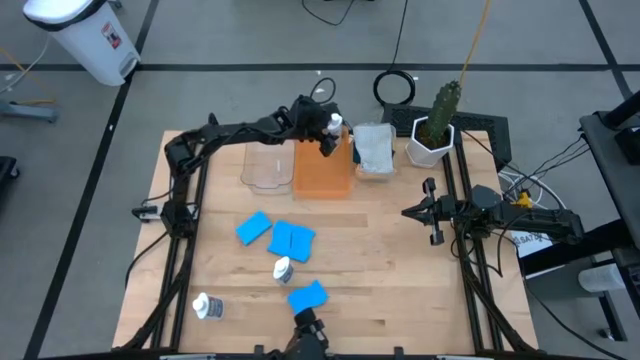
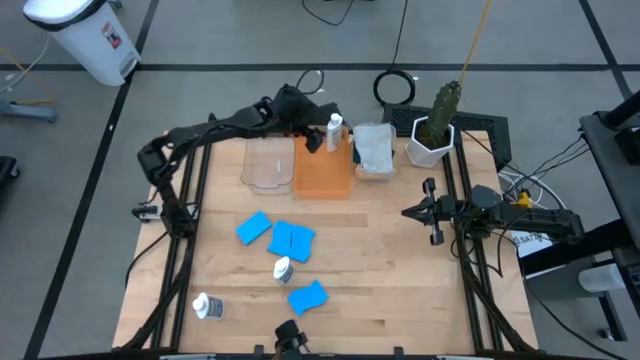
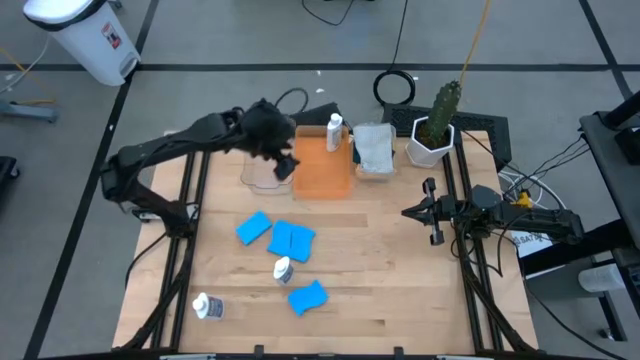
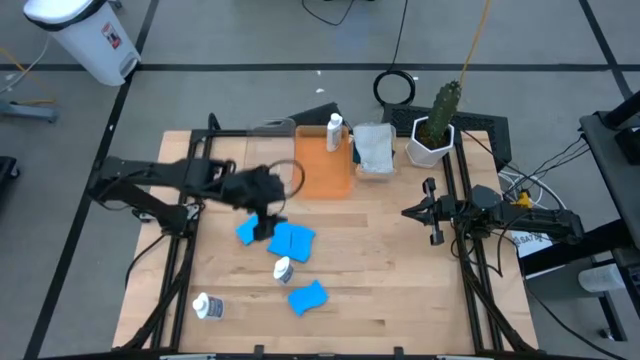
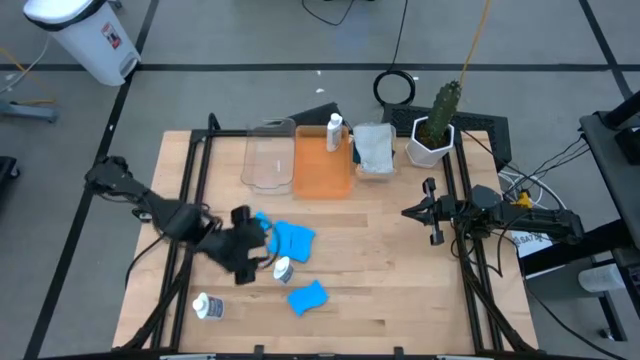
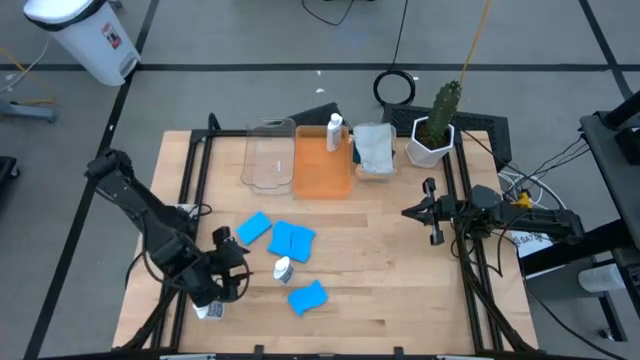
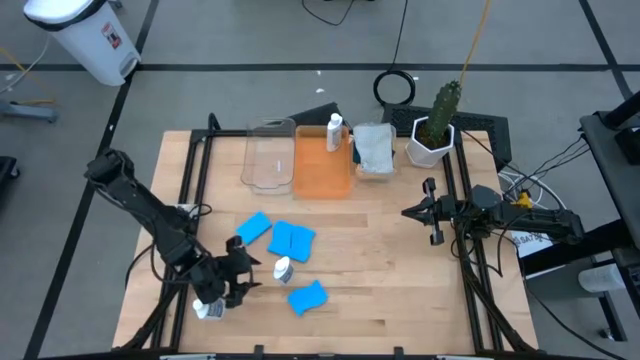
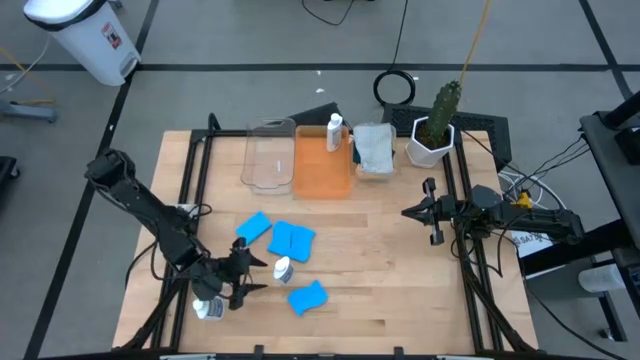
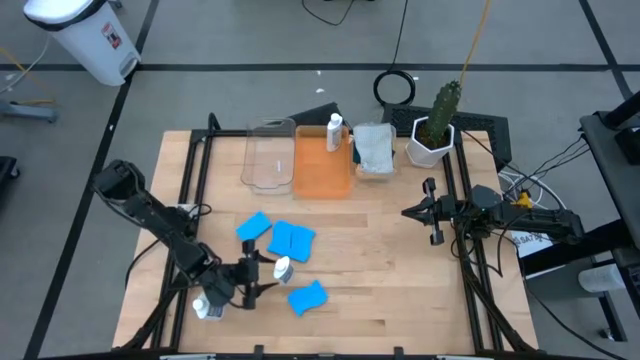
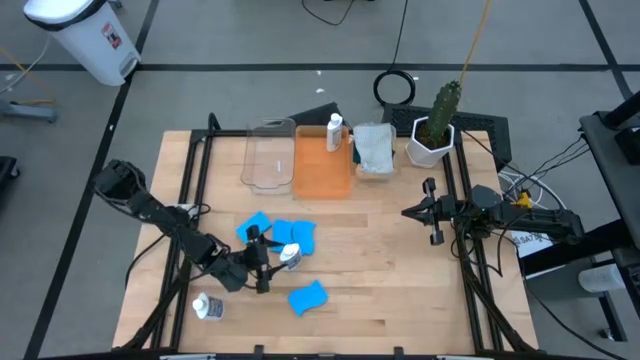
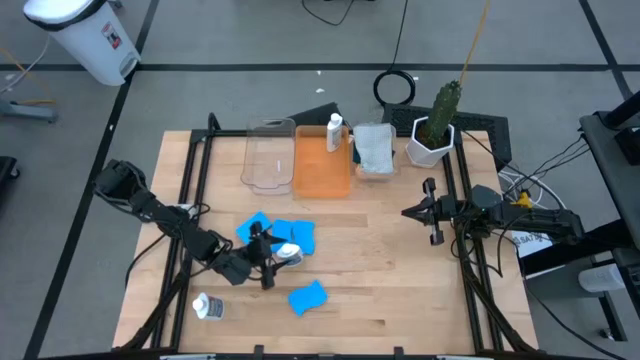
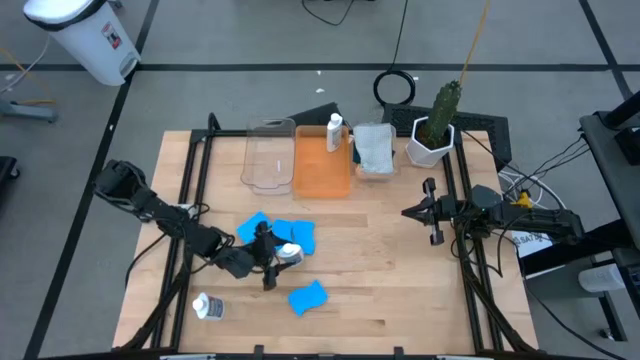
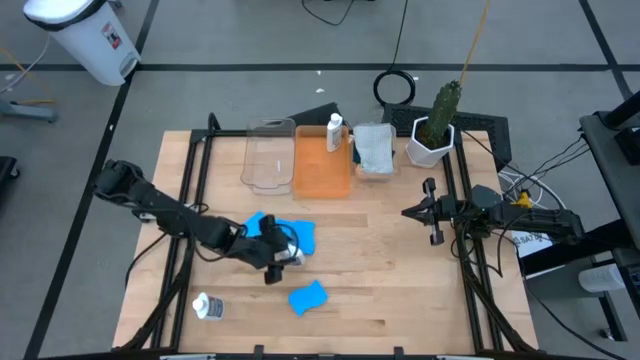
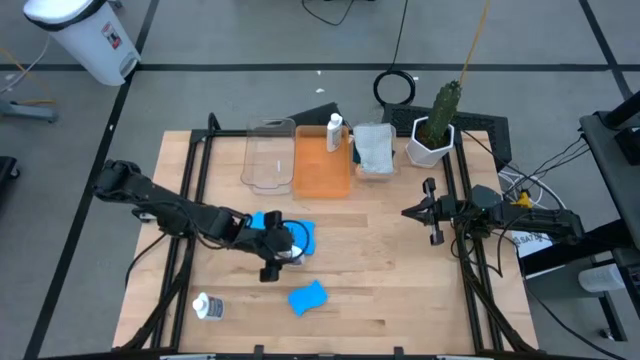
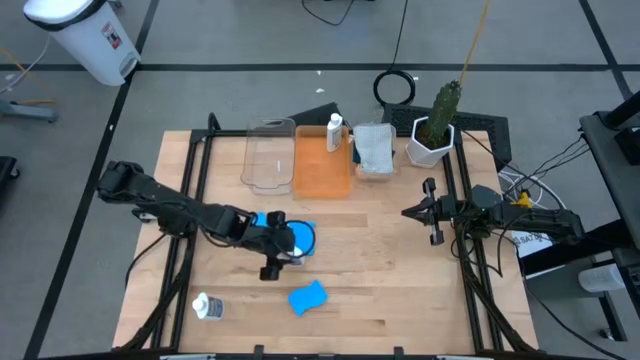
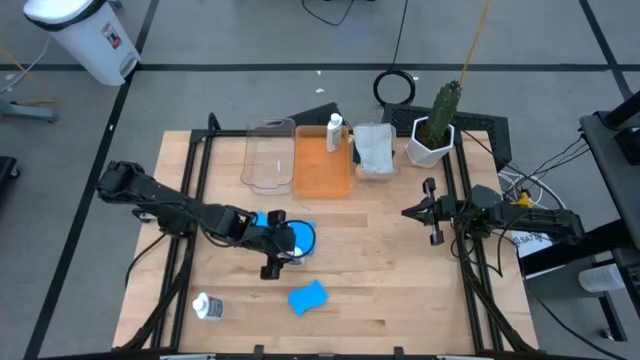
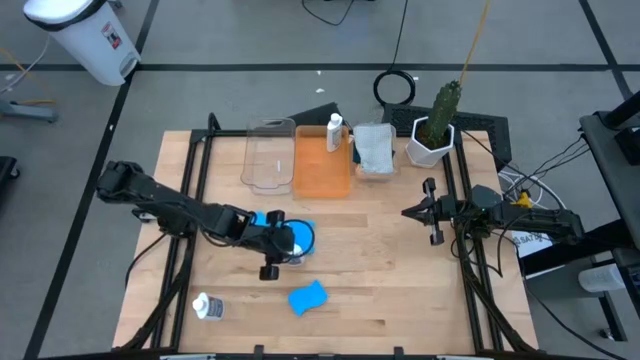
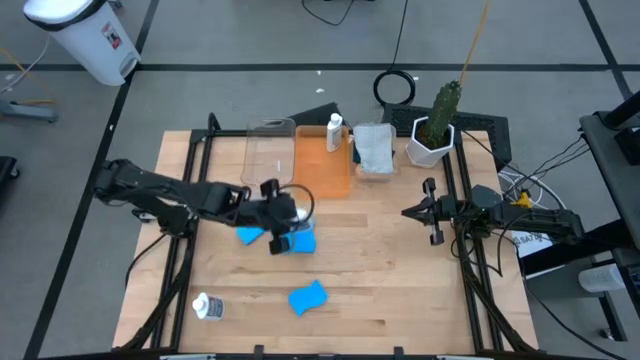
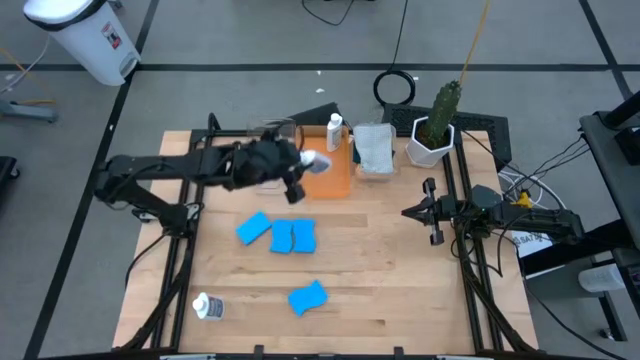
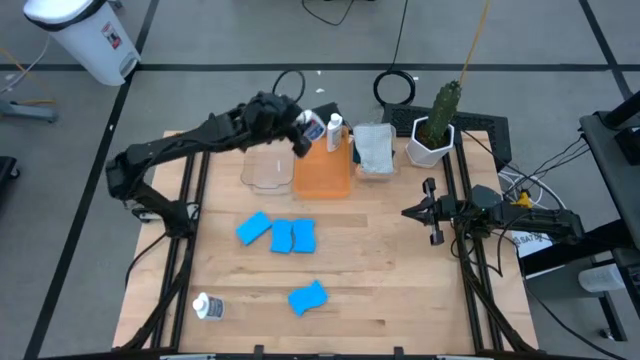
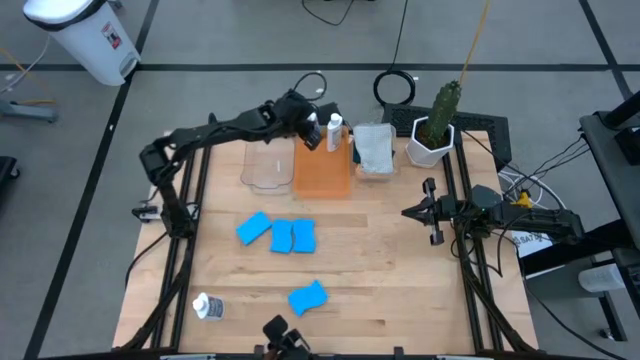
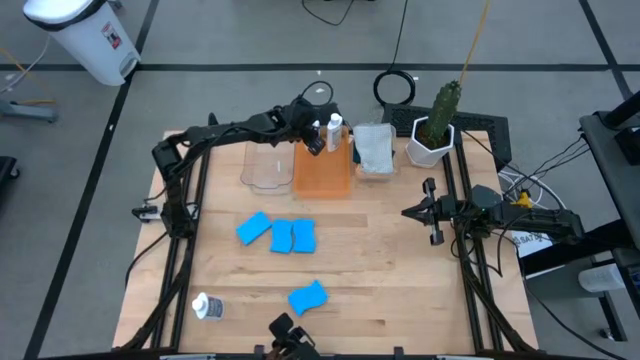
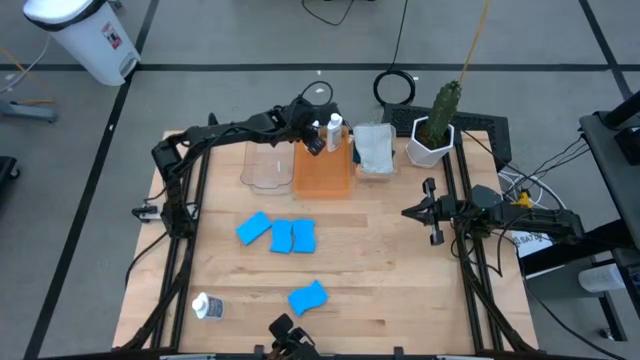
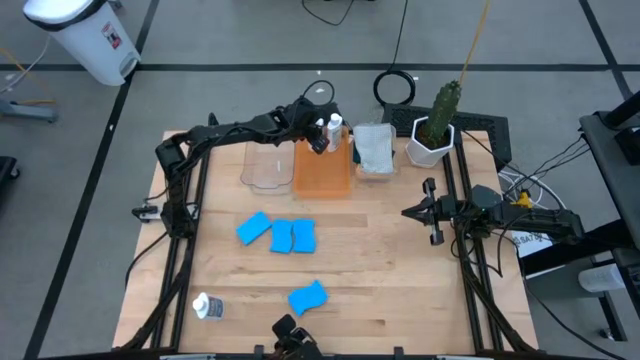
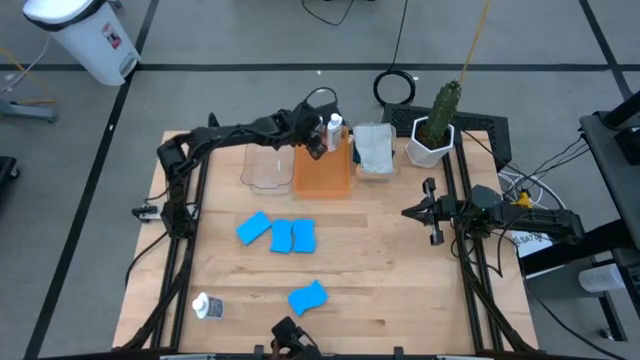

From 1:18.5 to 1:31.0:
Task: Pick & Place Kitchen Items
Put the white plastic restorer bottle into the orange bin

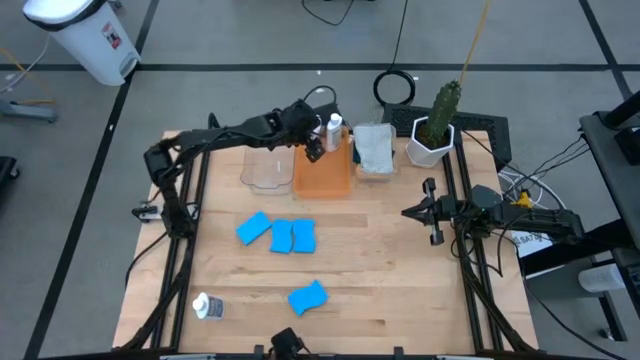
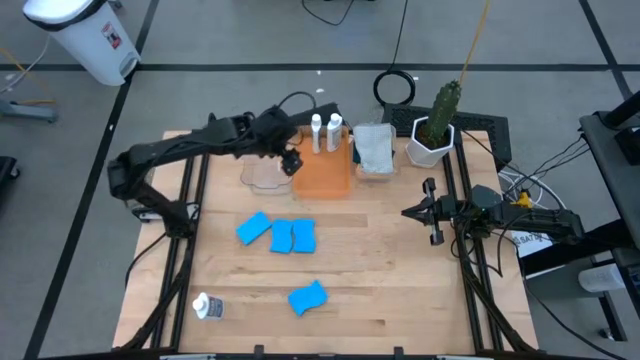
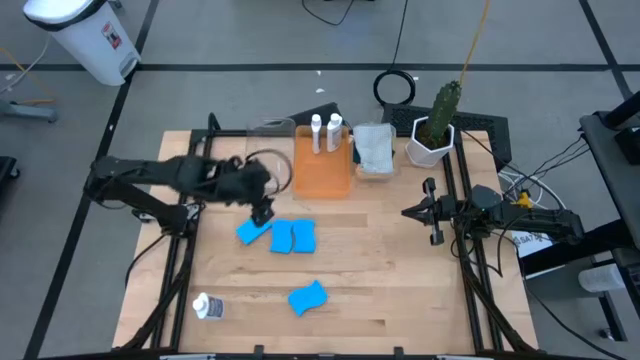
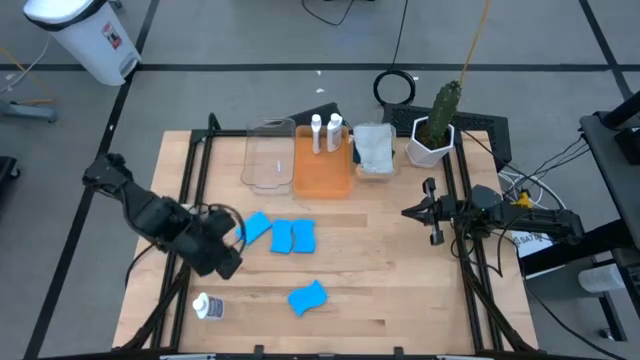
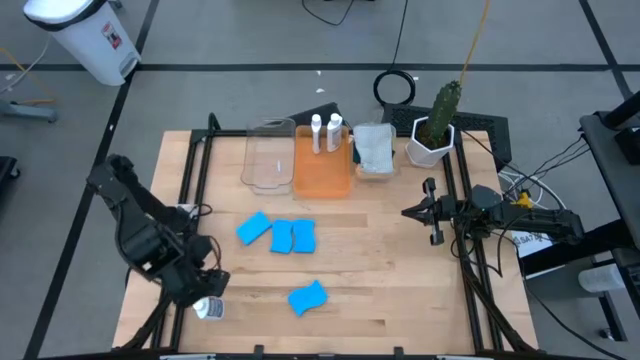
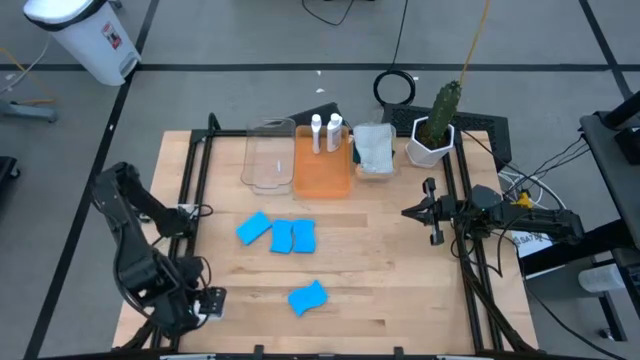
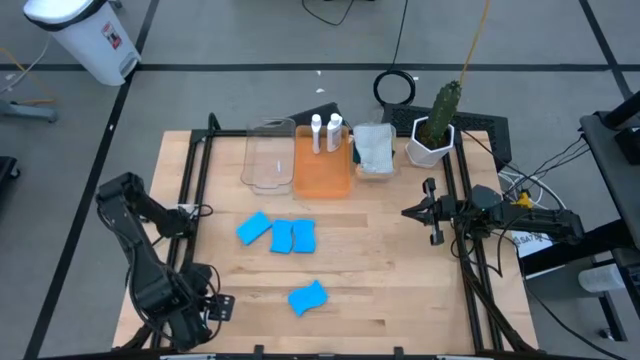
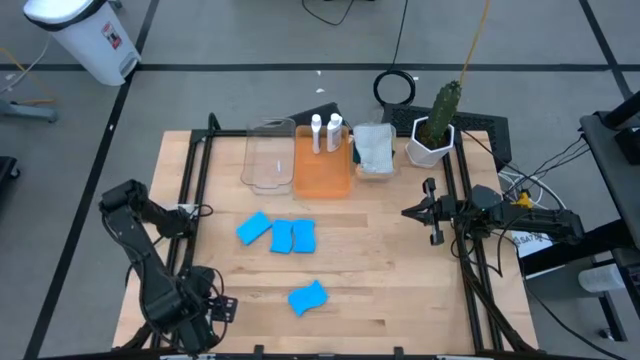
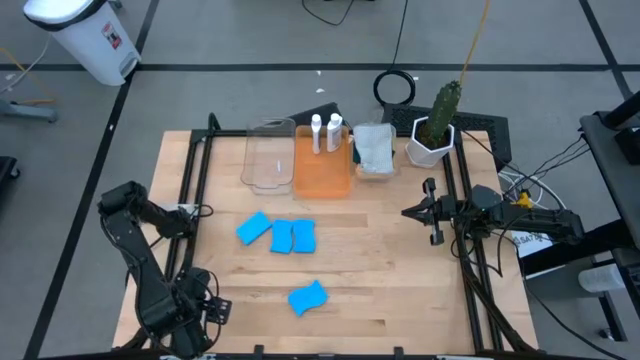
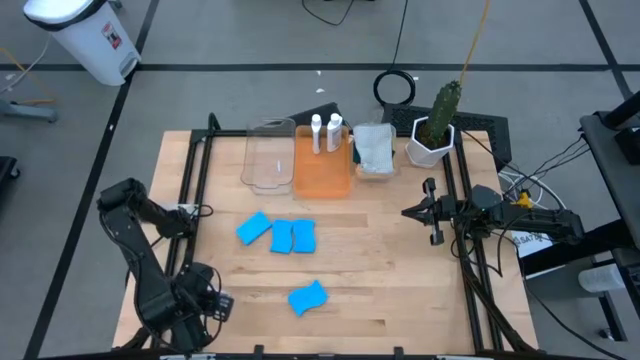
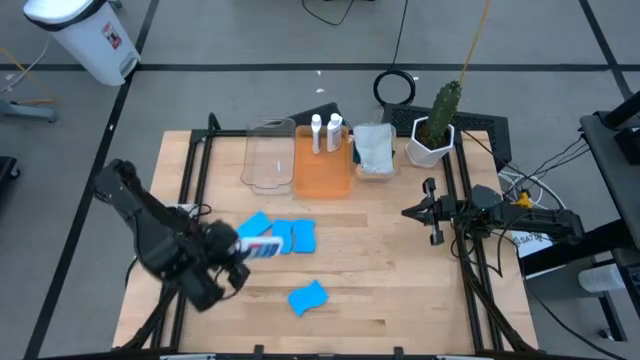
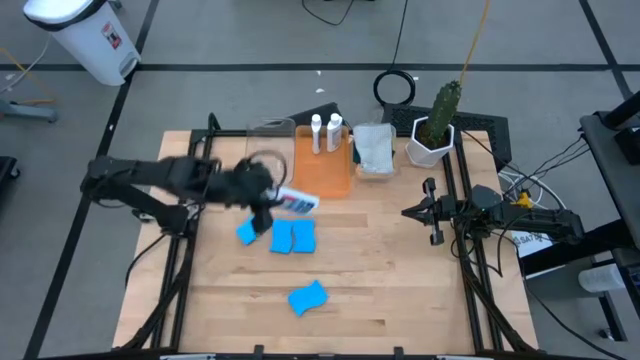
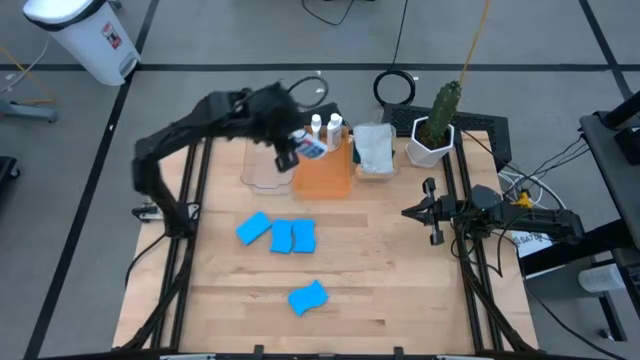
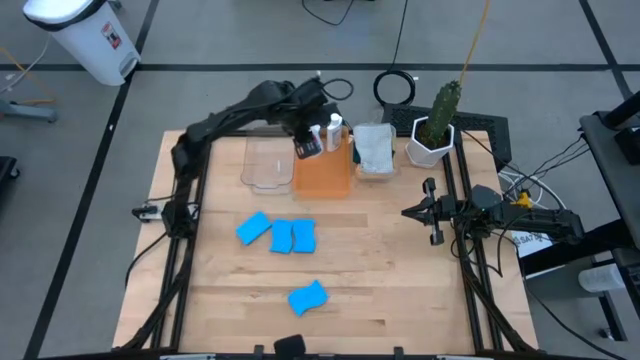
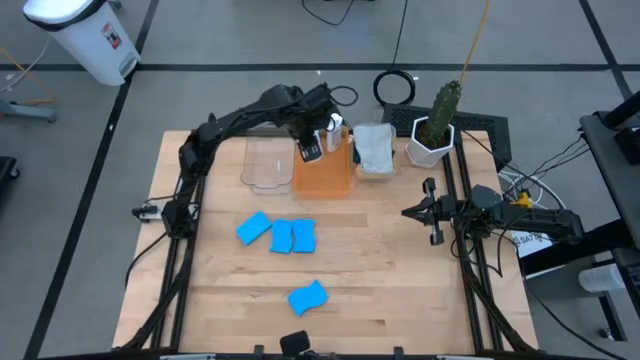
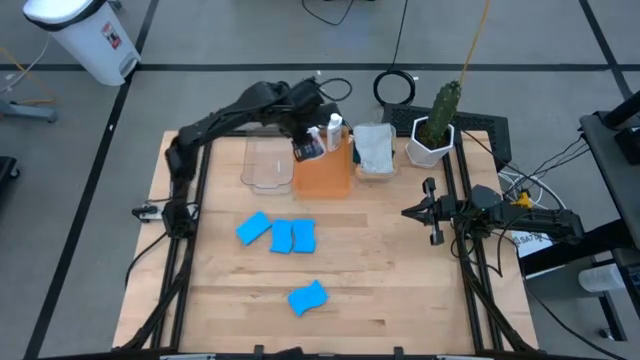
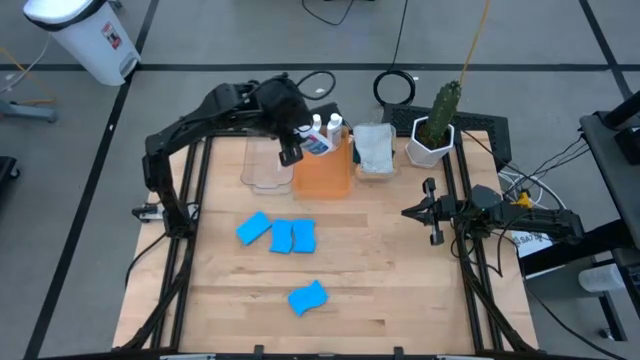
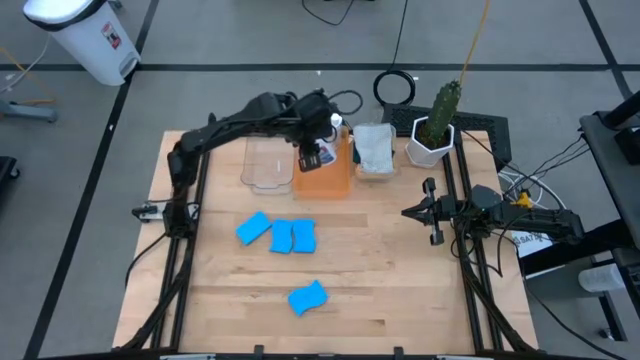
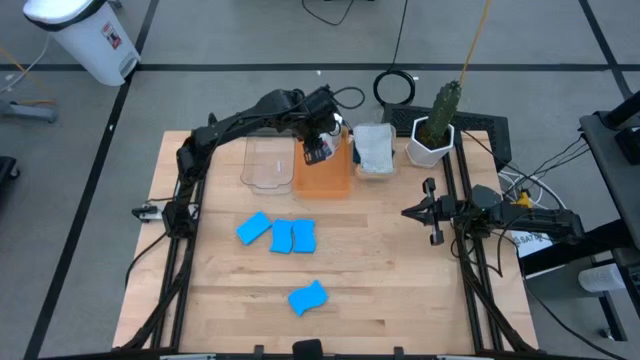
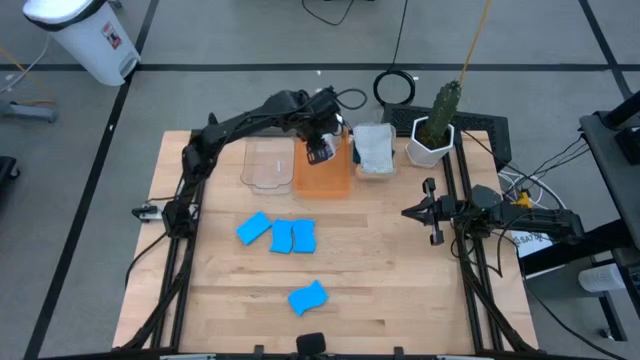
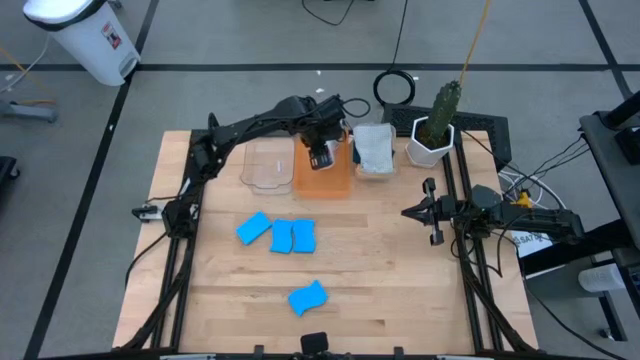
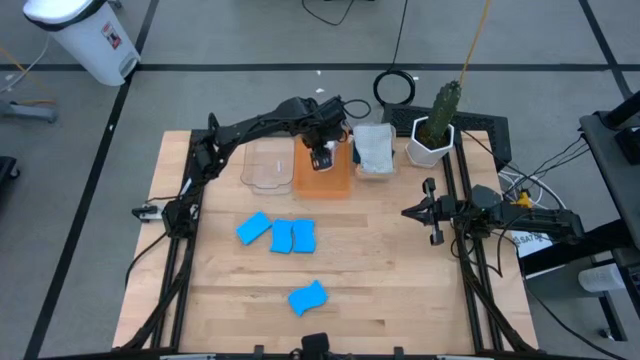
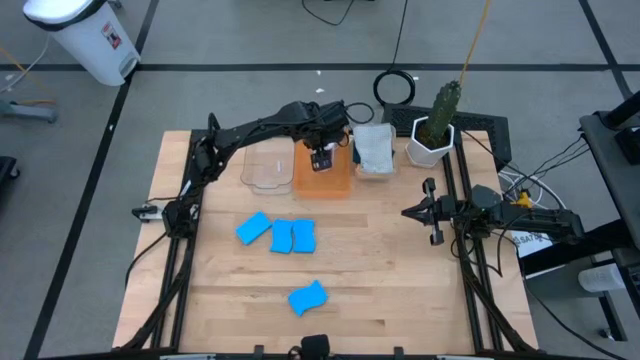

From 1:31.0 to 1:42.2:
Put the white plastic restorer bottle into the orange bin
